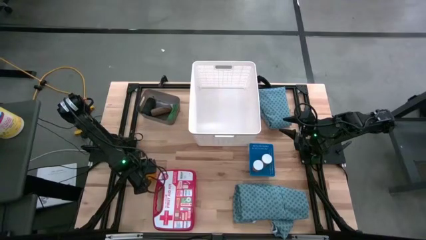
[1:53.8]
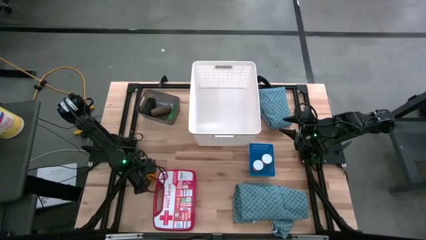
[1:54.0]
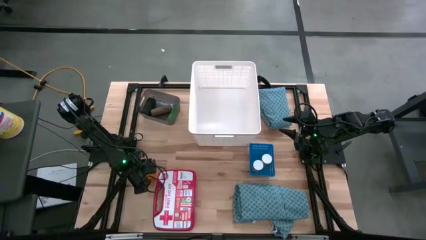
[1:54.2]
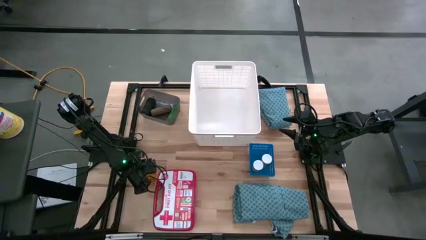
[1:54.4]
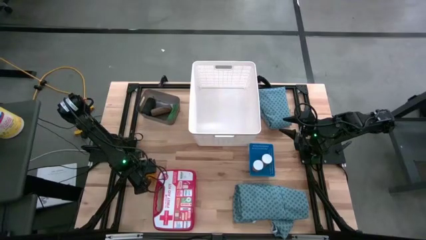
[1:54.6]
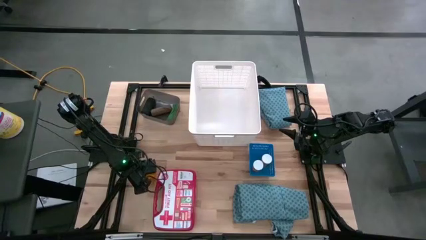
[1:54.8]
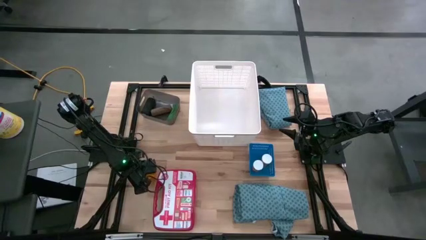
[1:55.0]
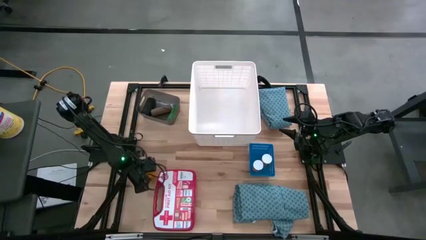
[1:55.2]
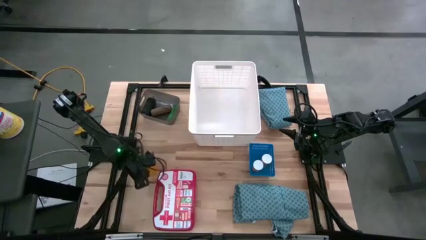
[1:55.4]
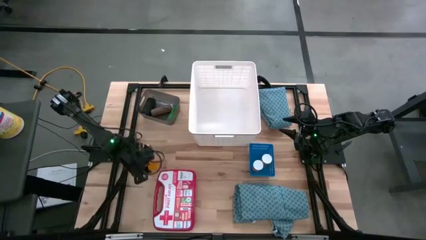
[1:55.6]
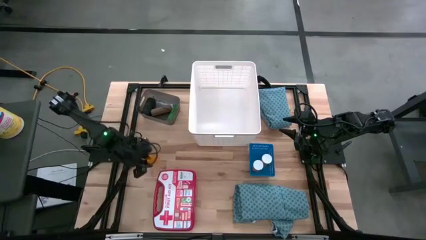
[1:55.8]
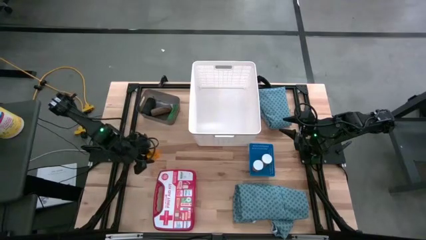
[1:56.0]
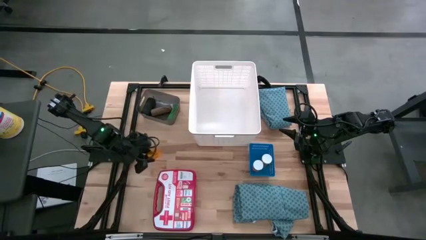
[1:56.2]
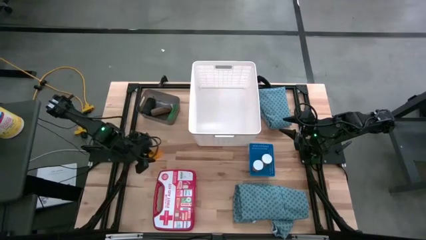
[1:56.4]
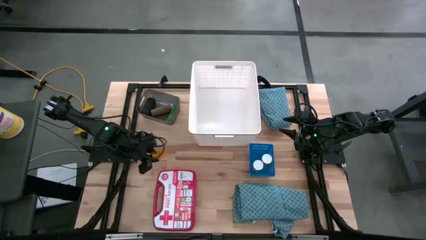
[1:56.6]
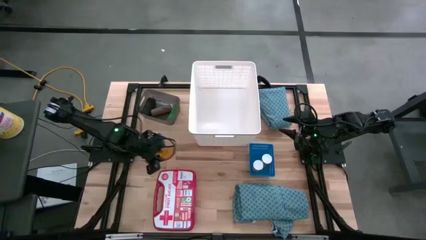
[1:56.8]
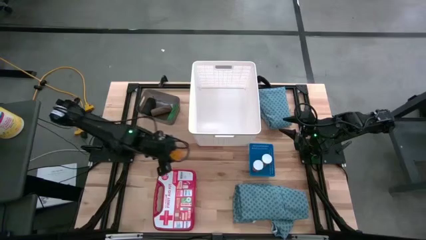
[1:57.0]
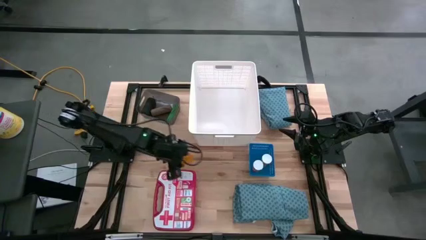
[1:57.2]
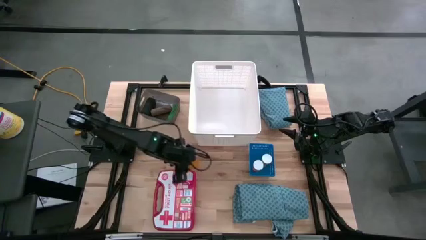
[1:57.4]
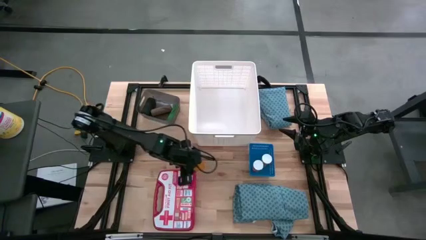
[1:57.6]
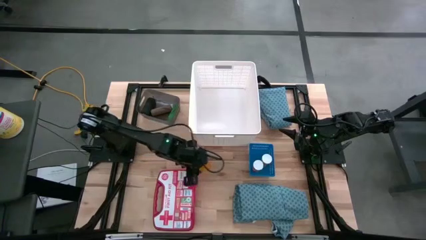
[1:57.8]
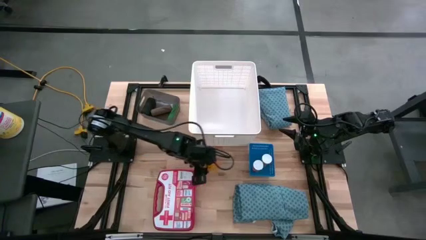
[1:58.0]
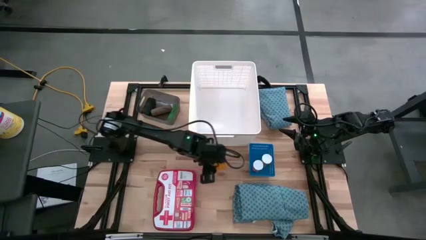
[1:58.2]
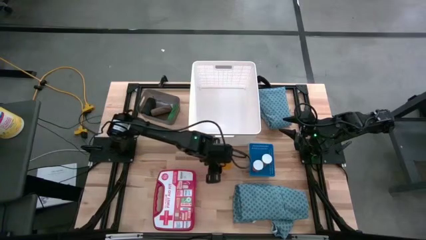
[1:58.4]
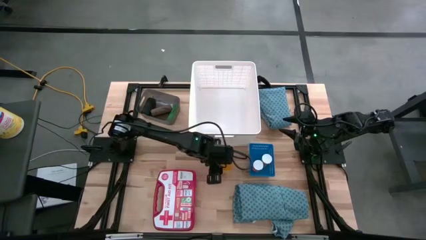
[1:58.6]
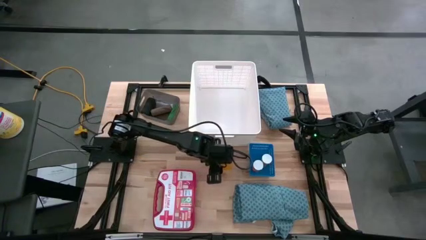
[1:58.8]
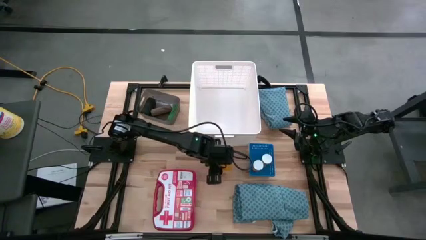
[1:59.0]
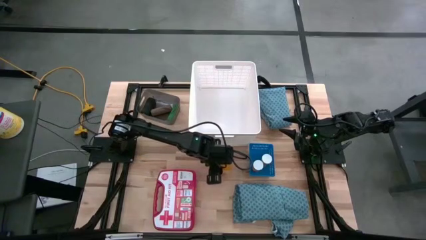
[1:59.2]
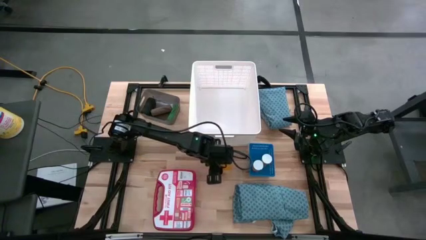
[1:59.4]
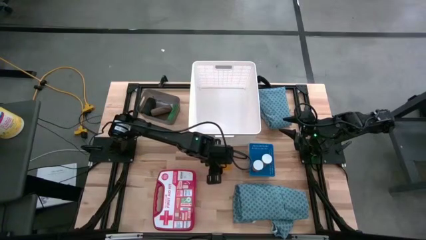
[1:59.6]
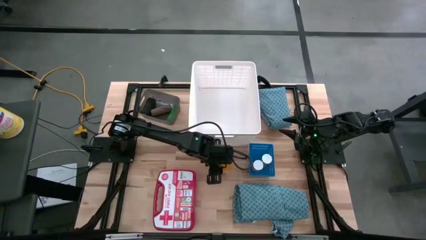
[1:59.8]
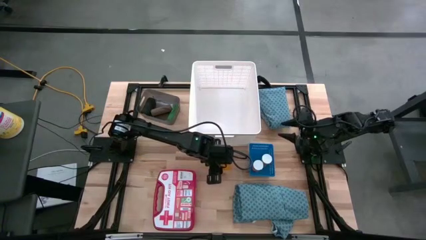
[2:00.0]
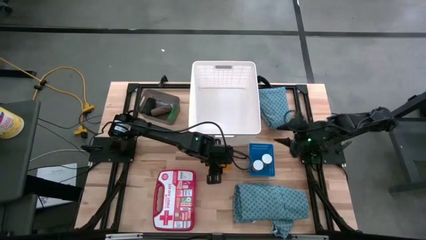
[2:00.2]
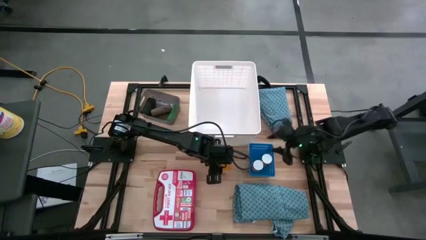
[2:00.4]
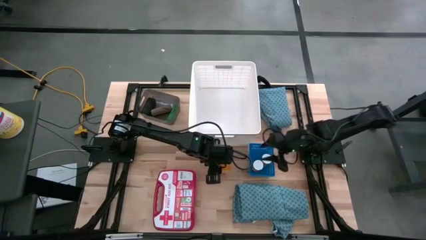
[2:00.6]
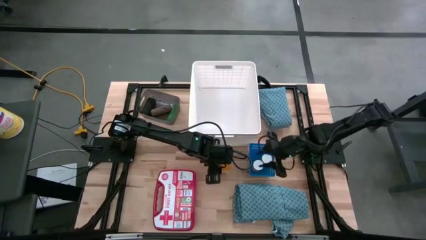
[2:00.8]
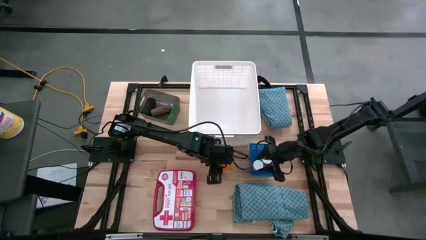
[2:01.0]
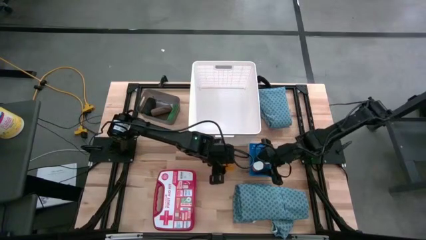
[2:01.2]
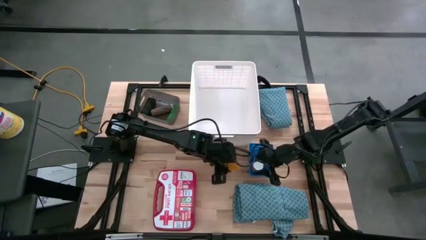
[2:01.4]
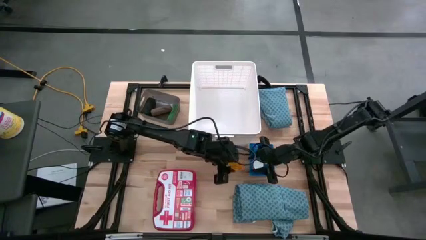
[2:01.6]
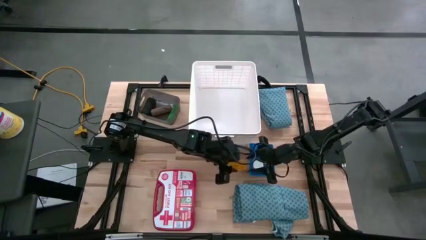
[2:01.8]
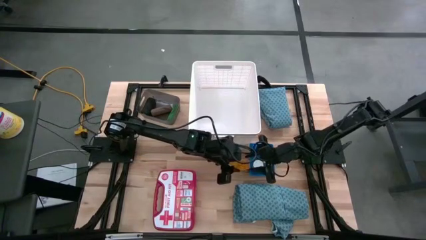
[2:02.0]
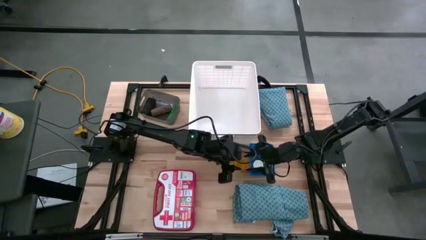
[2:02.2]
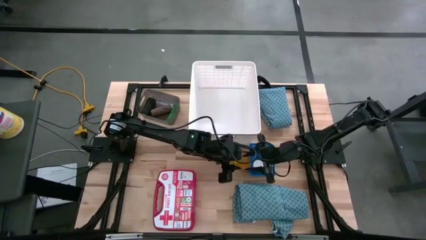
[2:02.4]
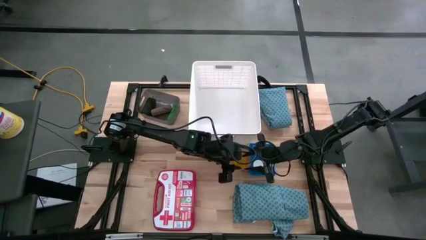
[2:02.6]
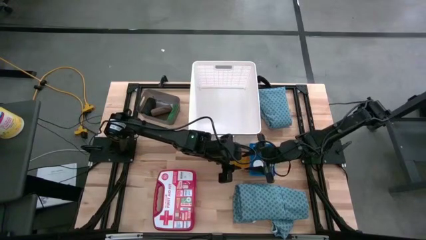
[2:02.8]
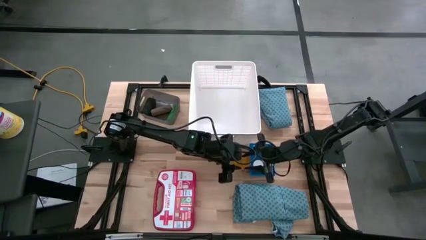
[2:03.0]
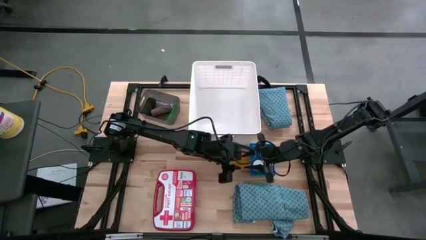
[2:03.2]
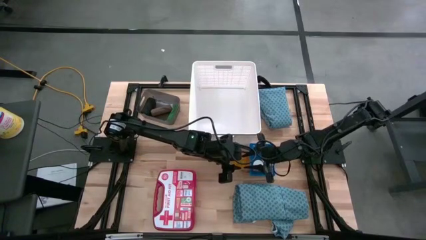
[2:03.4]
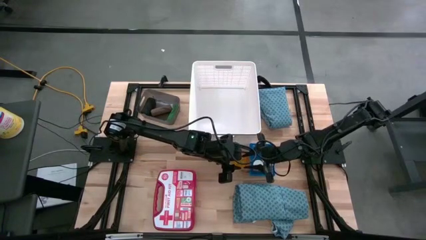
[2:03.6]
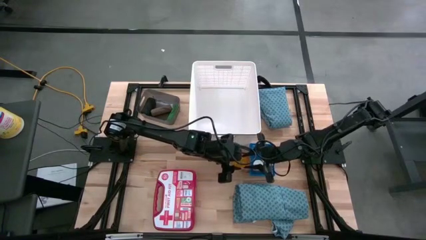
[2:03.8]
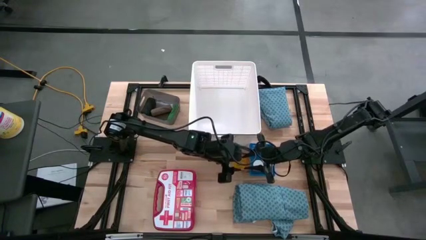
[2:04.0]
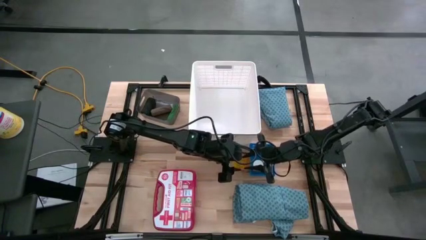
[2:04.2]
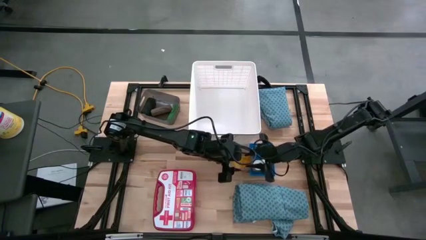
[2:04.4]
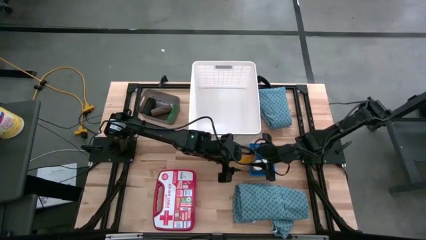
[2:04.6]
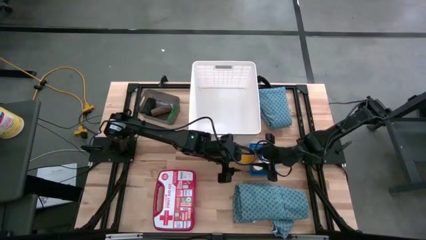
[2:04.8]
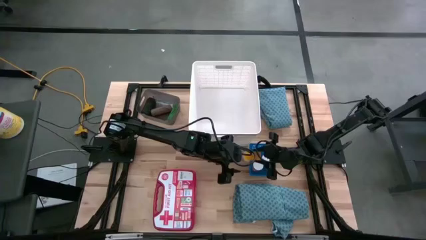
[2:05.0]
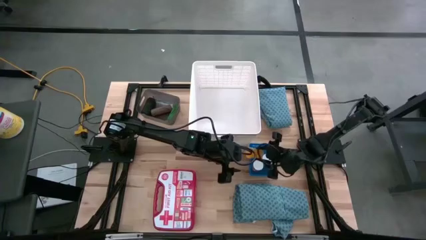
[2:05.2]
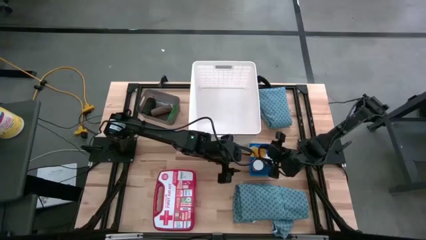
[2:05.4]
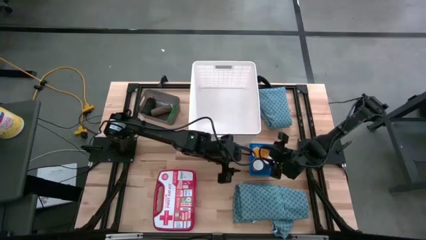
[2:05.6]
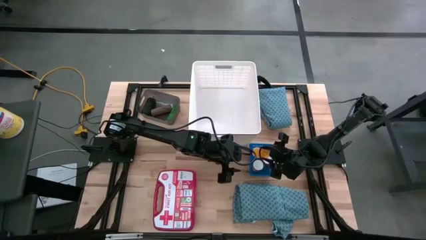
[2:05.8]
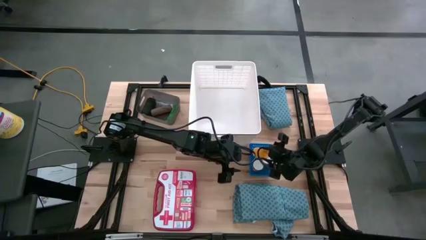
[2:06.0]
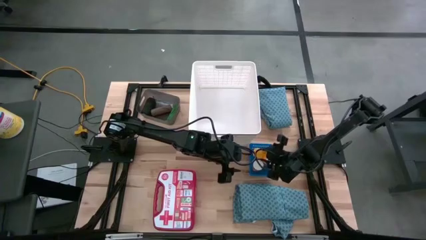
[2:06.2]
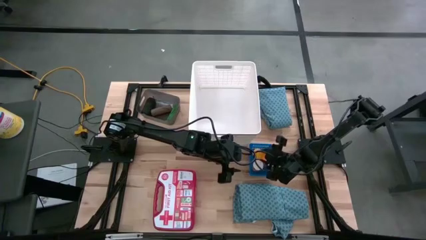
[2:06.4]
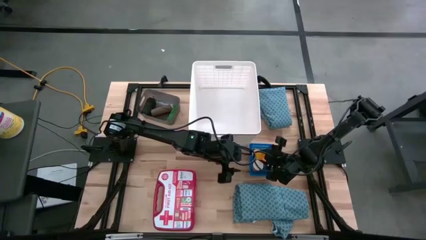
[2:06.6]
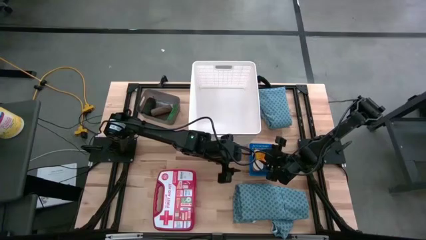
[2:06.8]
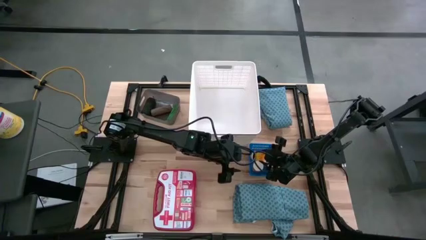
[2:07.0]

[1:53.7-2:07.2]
Task: Pick & place medical supplies in basket/bin
Put the orange pill bottle into the blue bin

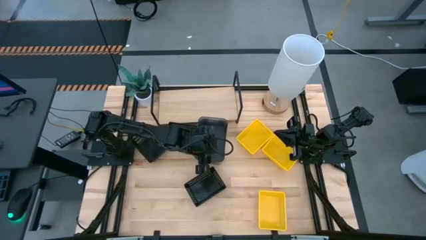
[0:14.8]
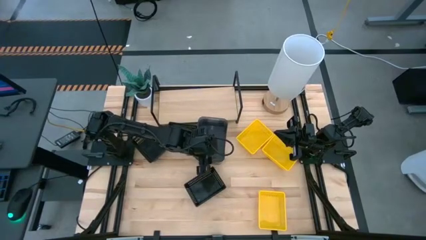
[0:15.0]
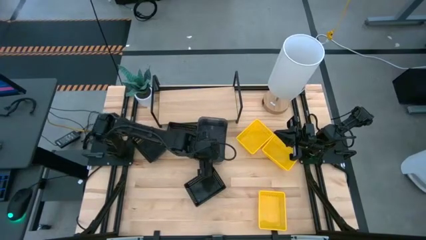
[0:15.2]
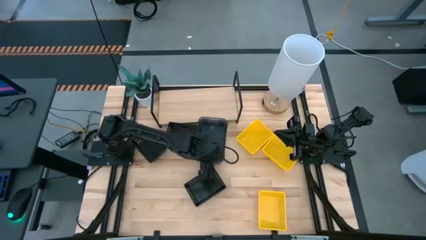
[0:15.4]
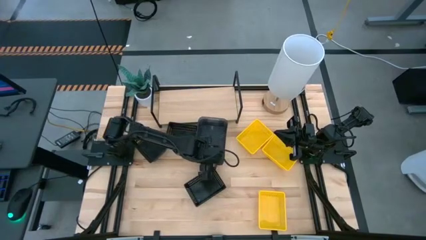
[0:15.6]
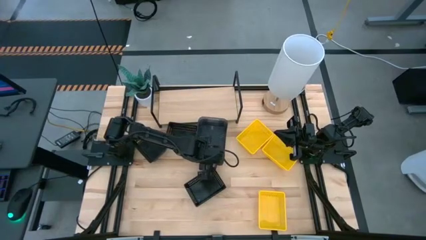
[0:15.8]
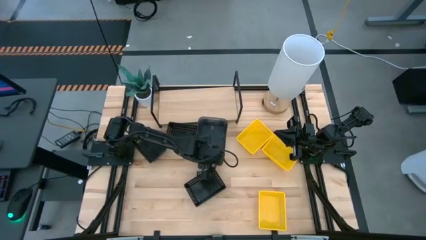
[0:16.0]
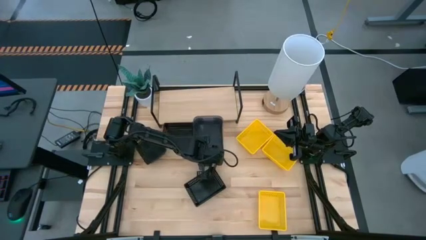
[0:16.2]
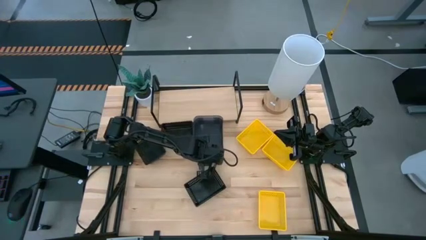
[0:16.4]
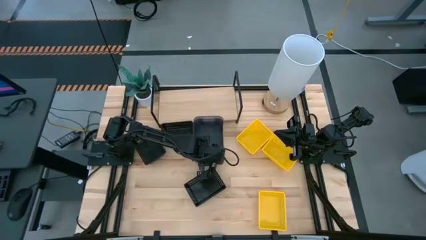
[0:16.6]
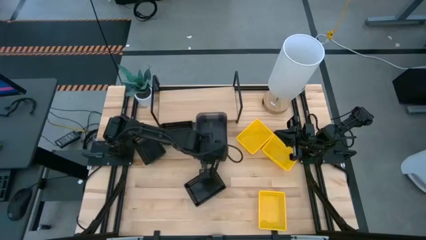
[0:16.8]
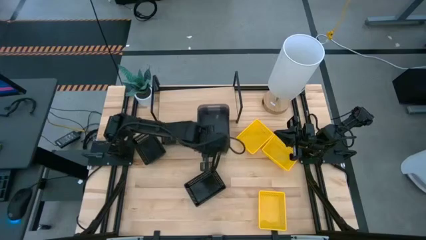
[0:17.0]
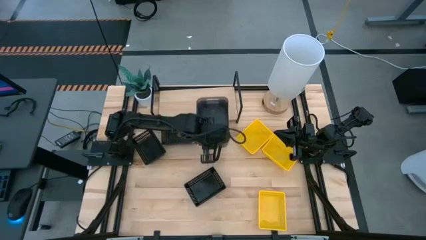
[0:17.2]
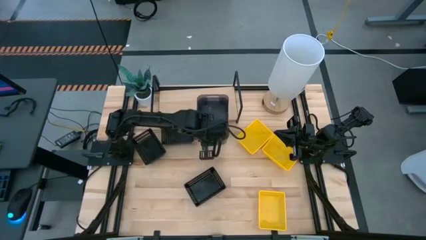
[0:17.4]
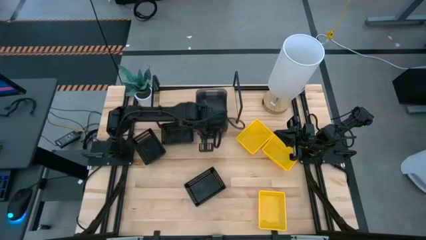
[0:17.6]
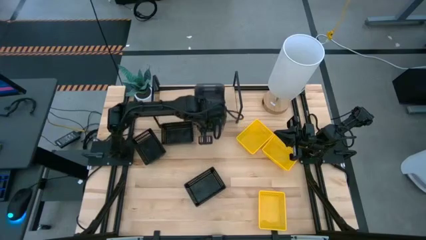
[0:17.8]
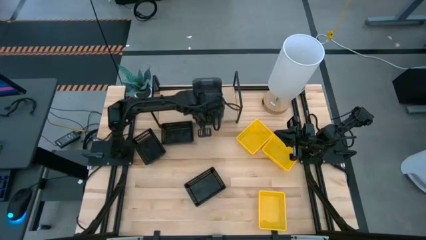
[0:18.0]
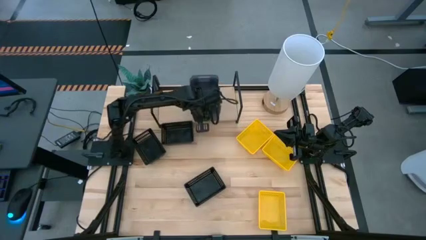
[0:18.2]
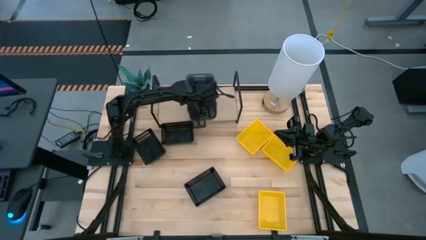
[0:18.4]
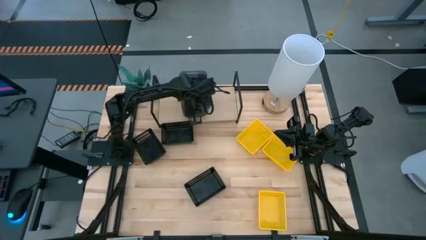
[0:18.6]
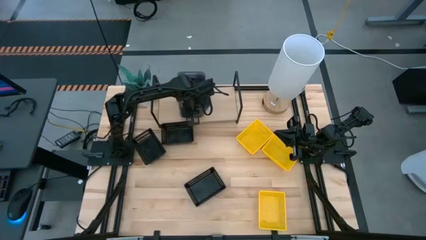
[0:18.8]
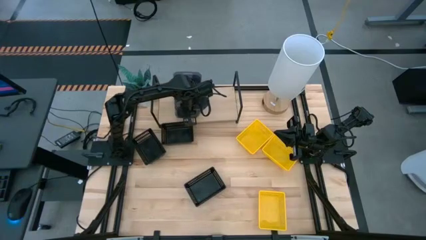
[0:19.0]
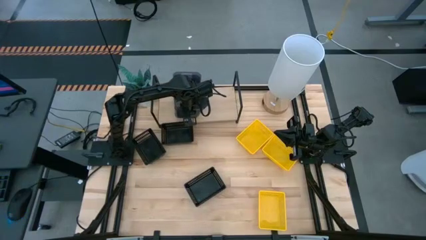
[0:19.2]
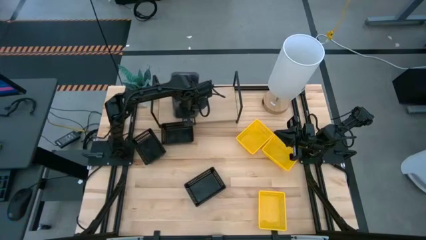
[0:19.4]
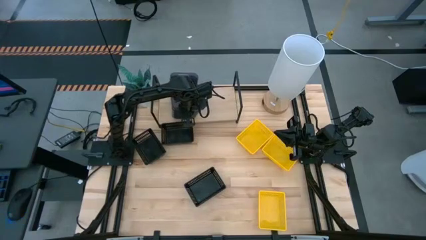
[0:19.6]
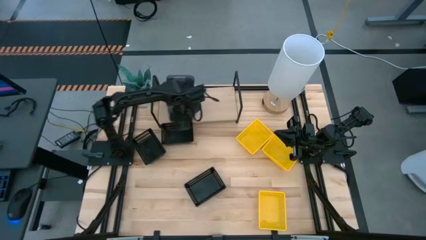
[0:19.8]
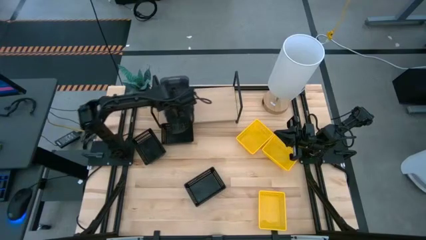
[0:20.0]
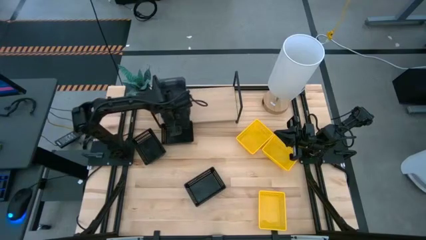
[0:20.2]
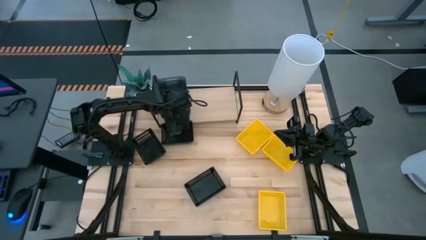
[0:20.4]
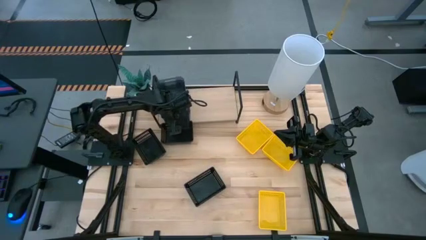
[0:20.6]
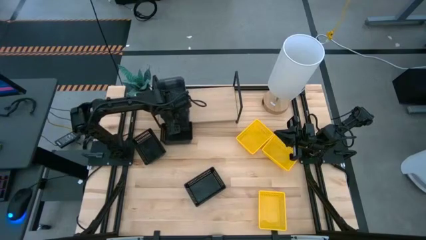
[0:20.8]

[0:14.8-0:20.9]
Task: Stack baskets on shelf by color
Put the stacked black bin on the shelf
